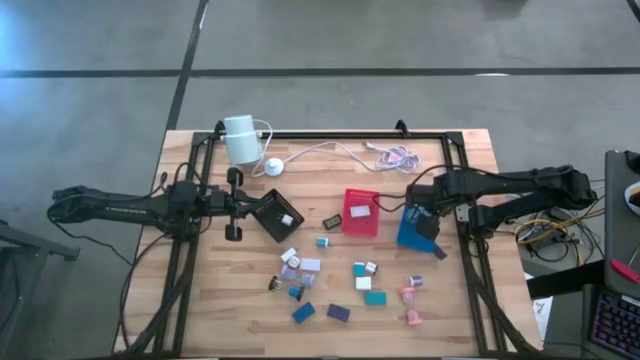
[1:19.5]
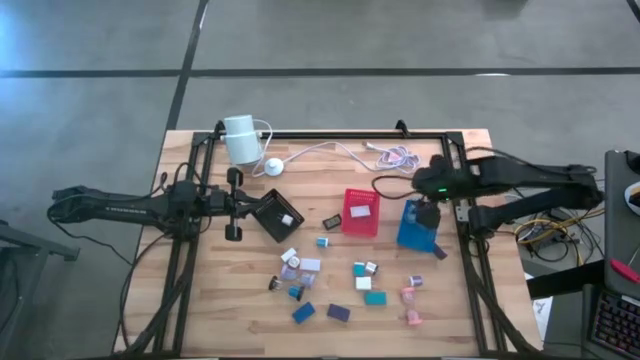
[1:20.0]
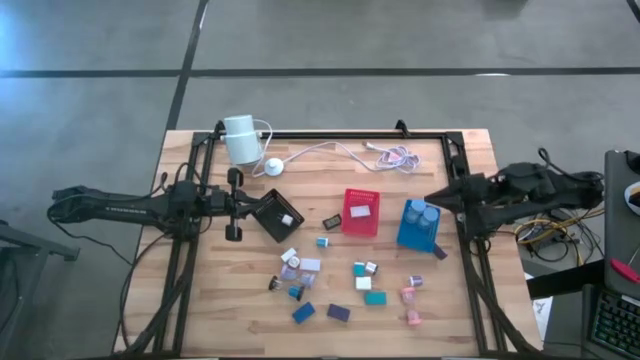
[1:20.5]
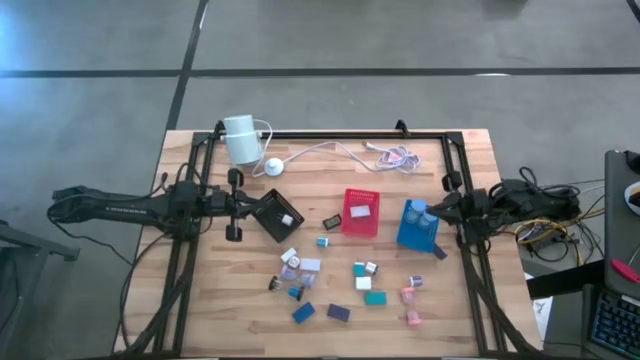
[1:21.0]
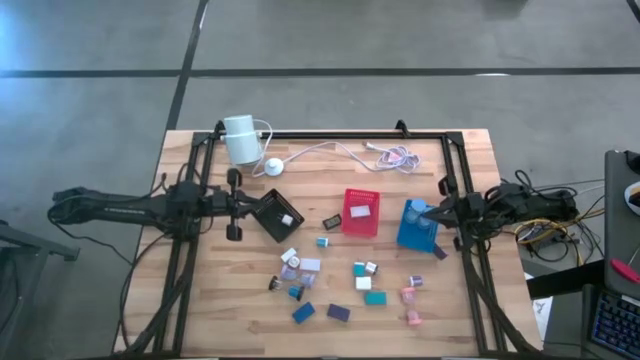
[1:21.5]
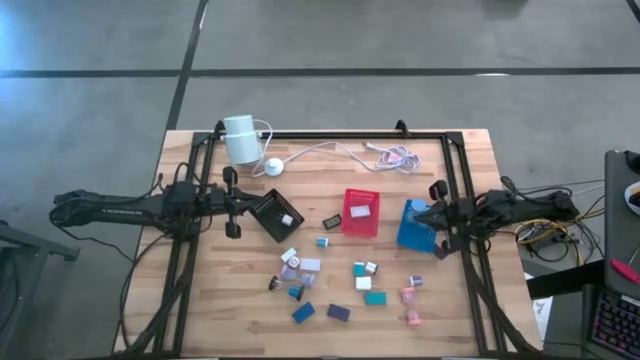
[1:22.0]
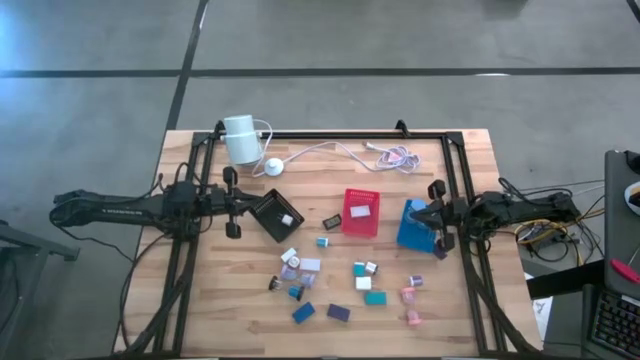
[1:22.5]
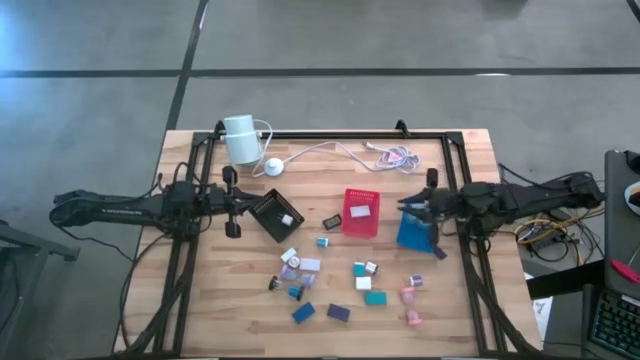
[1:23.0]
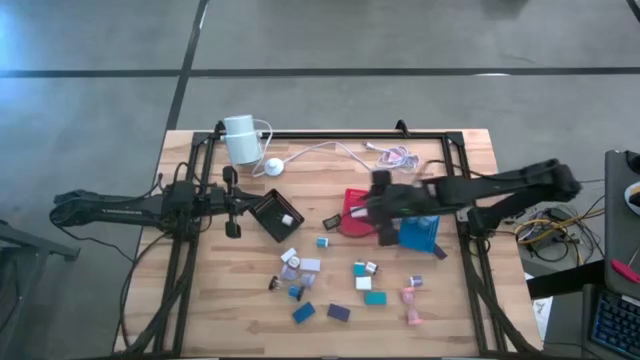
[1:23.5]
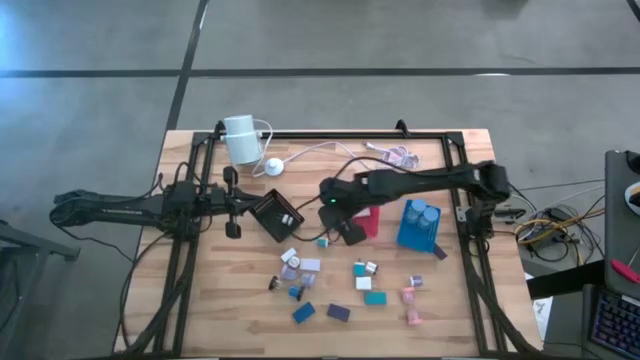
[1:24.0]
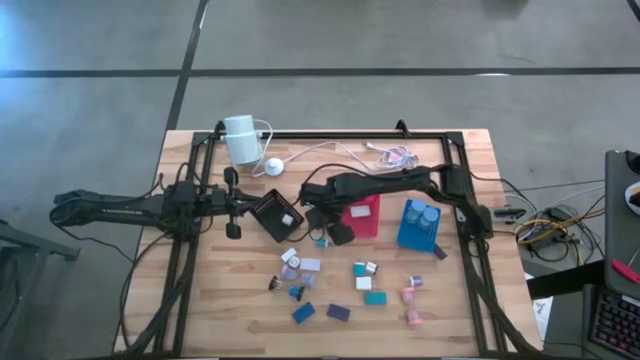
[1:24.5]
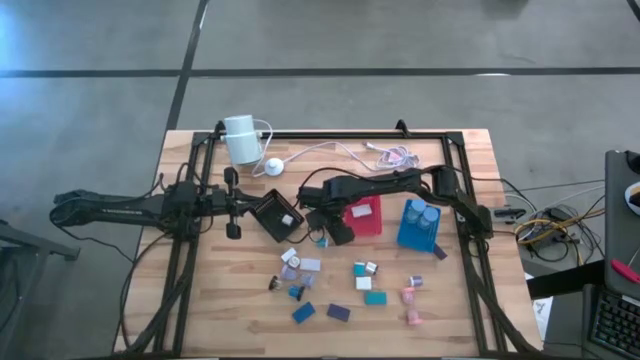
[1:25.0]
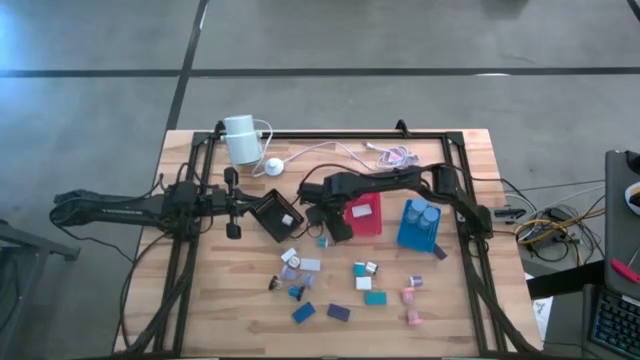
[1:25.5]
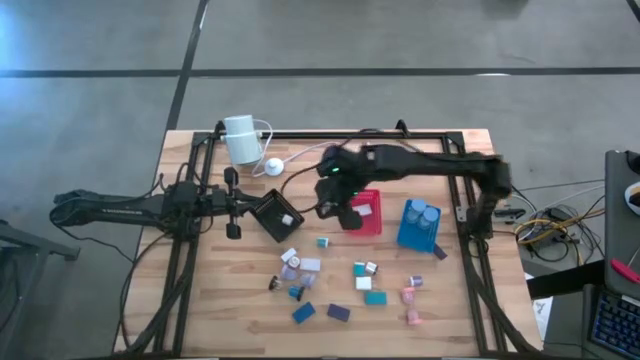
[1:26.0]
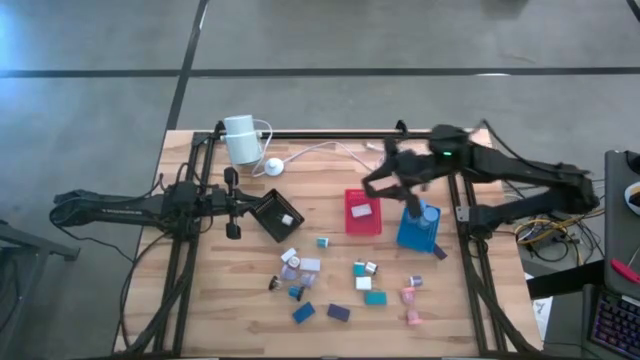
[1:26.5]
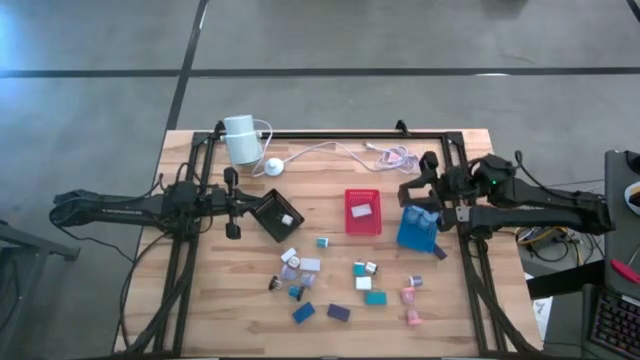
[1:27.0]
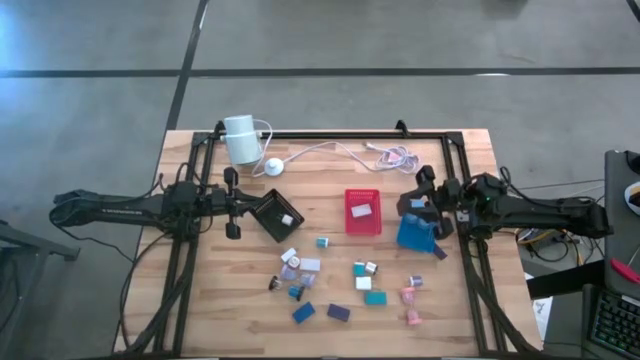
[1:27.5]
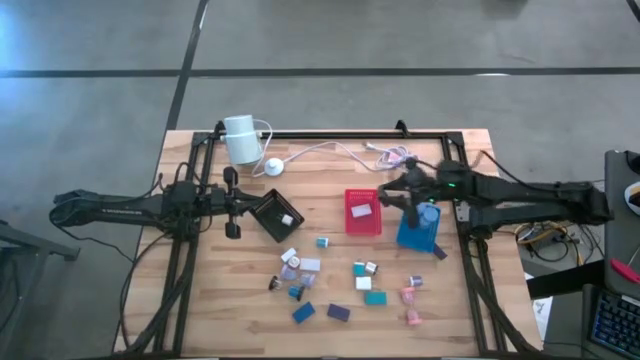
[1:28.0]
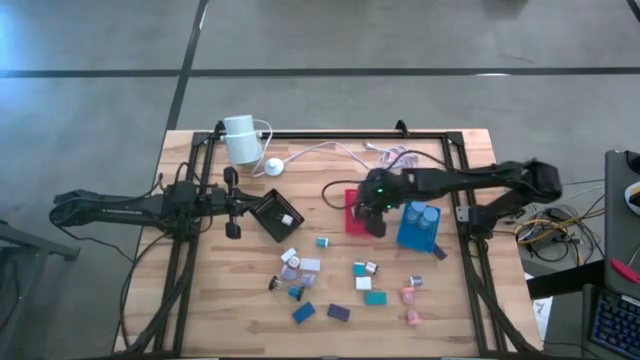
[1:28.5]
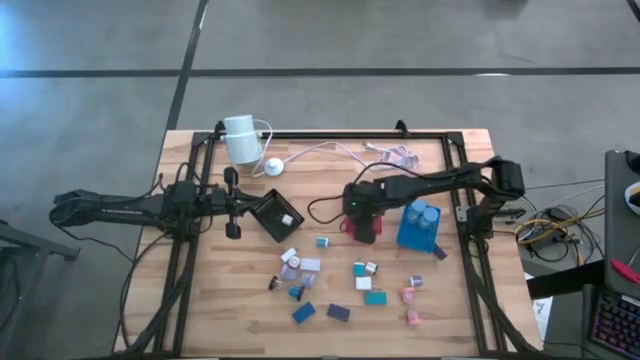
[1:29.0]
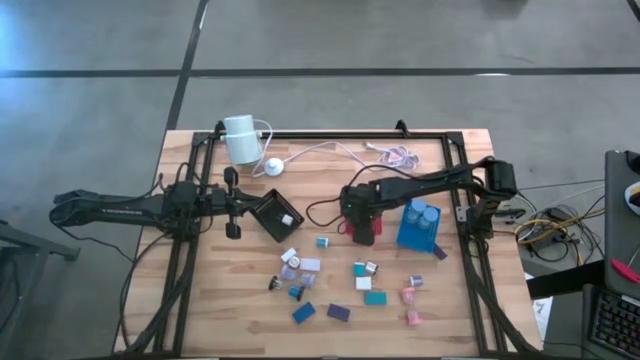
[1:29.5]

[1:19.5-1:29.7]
Task: Pick & Place Office items
Put the black digital clock into the red bin

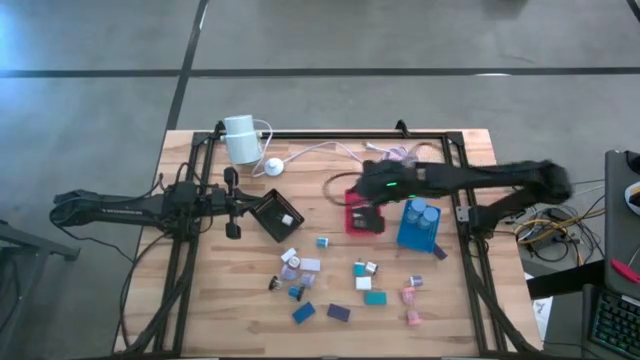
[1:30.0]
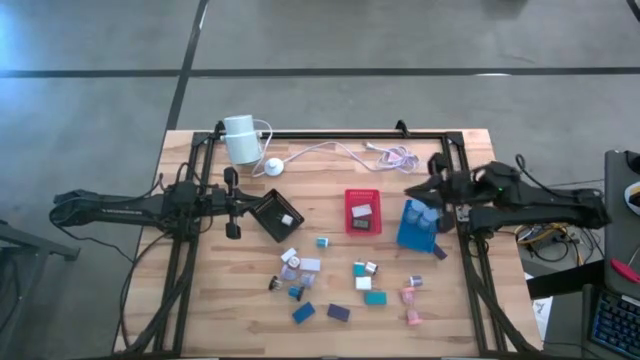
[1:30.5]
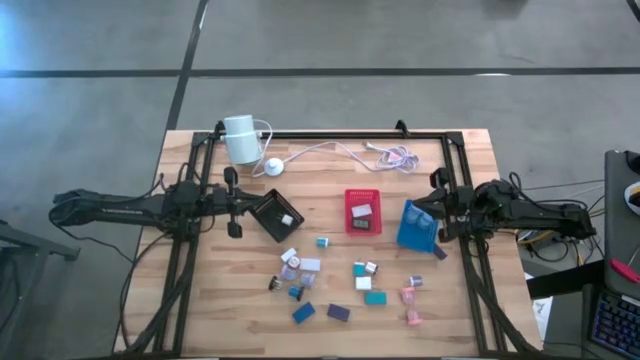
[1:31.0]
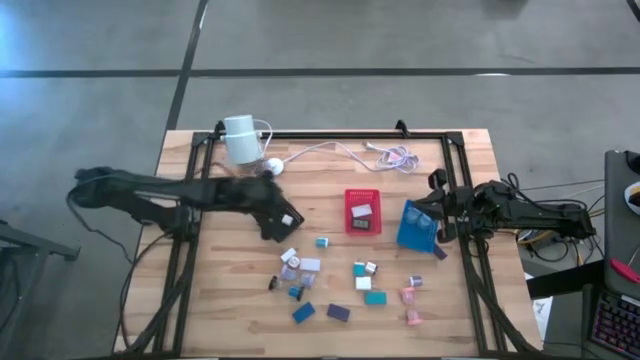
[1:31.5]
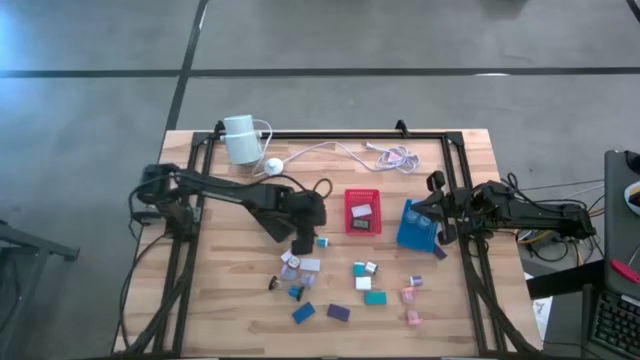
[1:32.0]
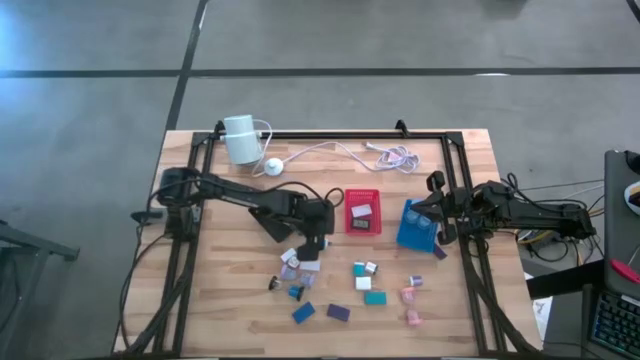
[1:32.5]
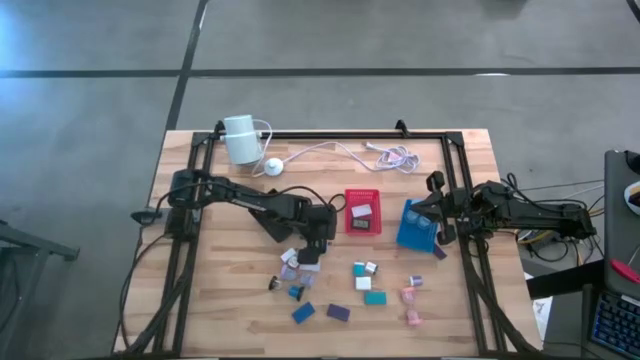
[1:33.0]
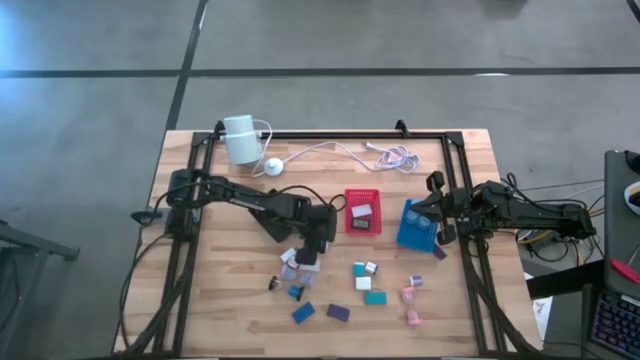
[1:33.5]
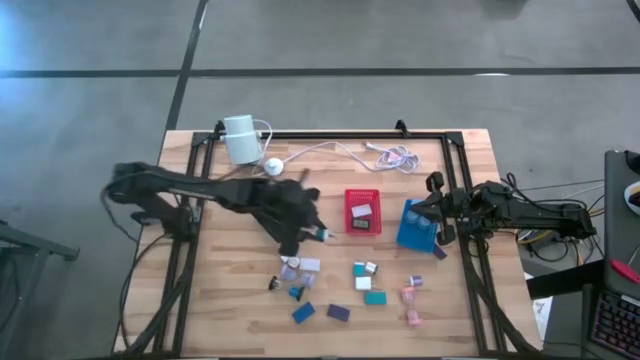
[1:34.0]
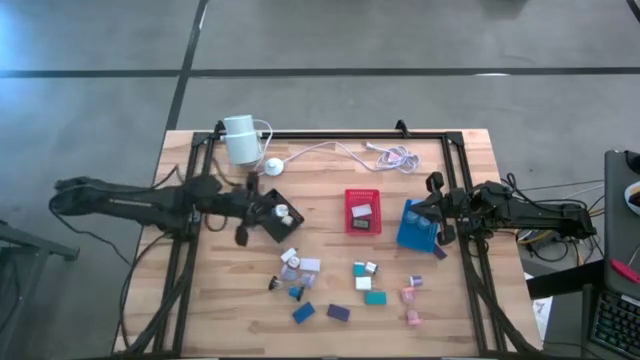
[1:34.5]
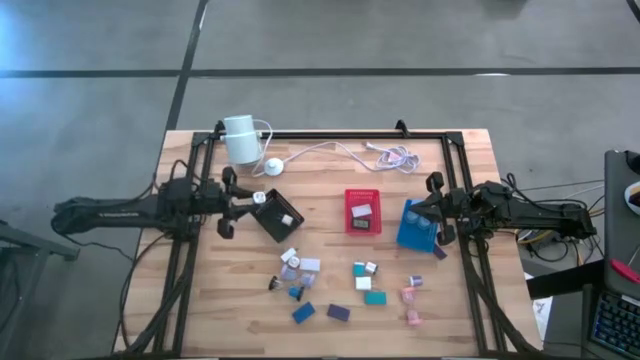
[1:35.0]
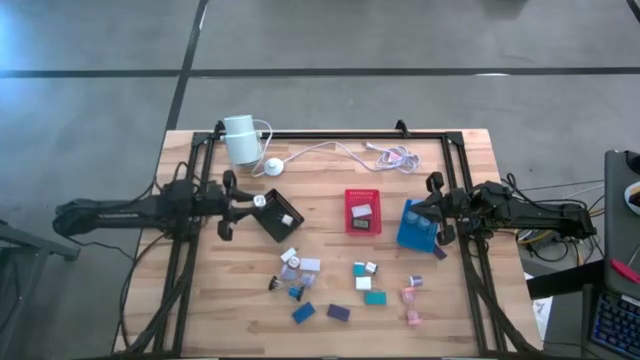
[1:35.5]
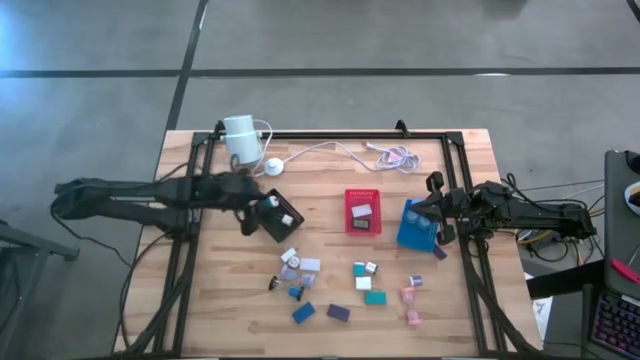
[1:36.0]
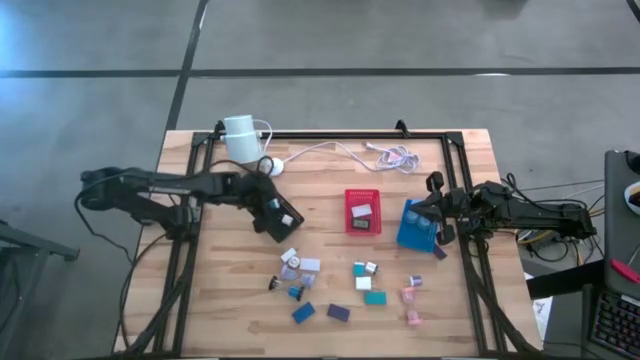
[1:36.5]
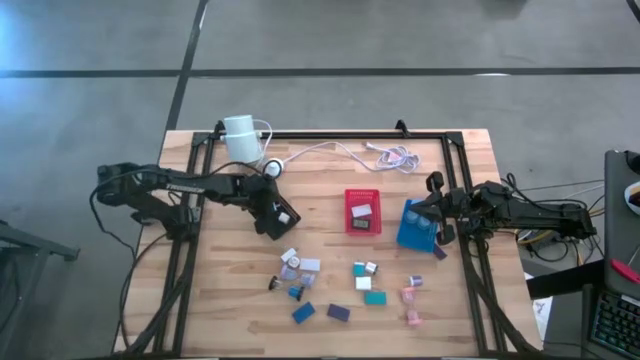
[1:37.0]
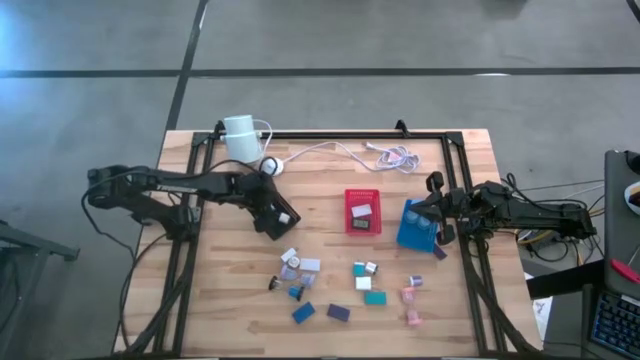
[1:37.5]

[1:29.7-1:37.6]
Put the top blue charger adaptor into the black bin
